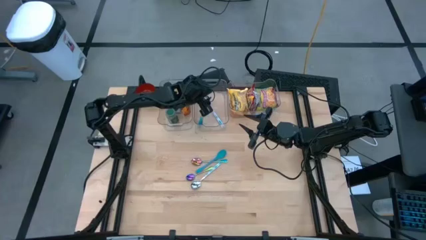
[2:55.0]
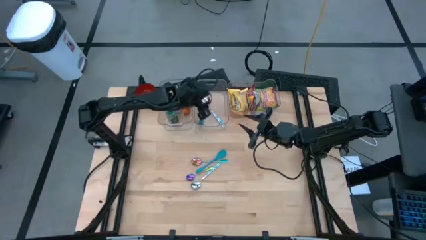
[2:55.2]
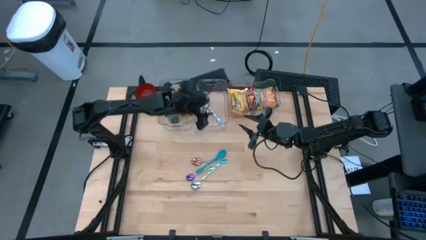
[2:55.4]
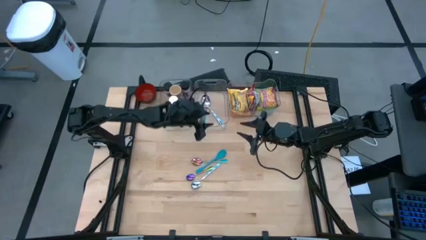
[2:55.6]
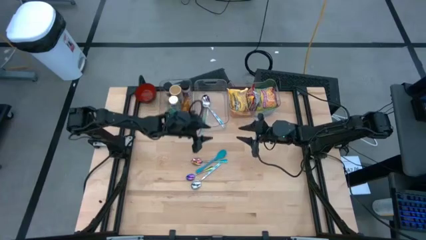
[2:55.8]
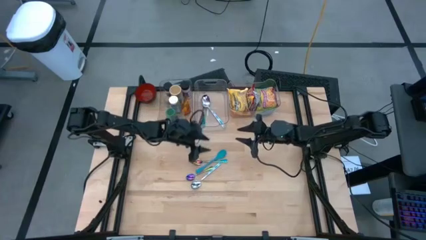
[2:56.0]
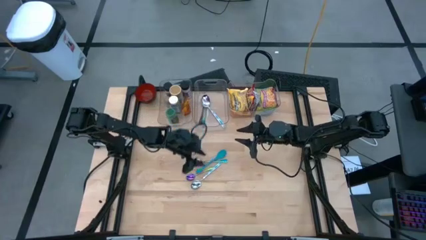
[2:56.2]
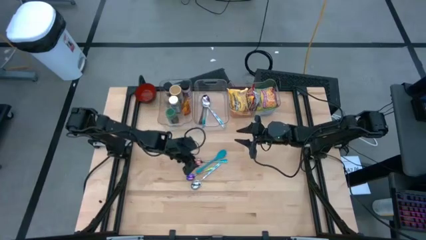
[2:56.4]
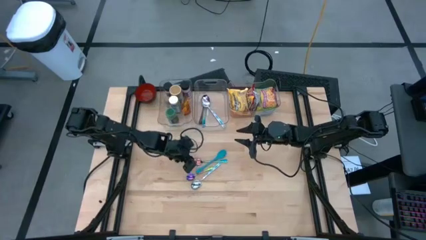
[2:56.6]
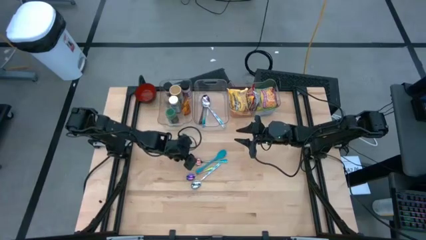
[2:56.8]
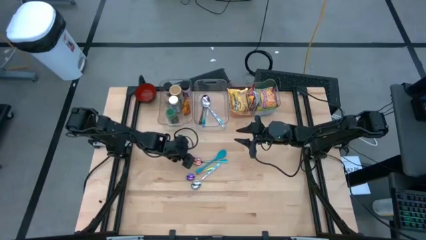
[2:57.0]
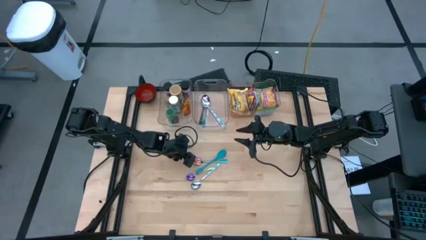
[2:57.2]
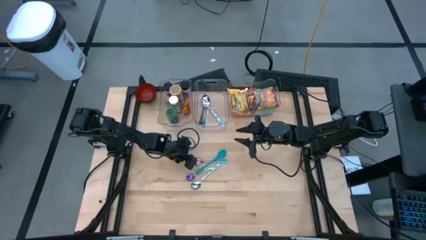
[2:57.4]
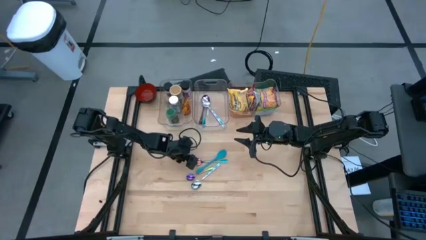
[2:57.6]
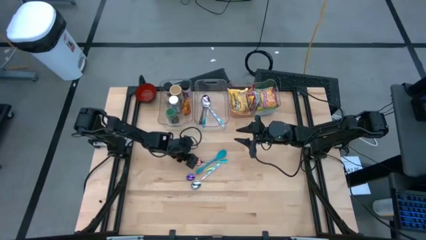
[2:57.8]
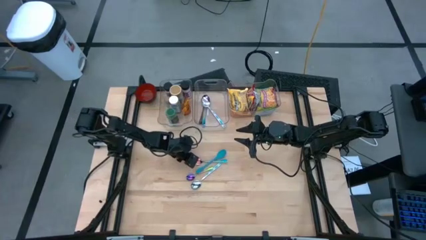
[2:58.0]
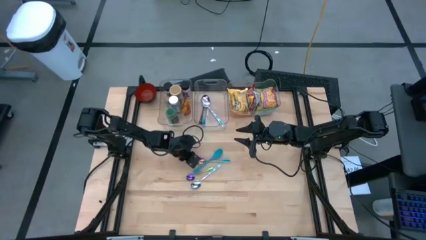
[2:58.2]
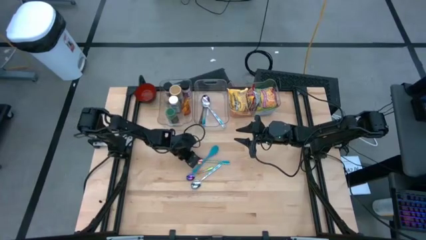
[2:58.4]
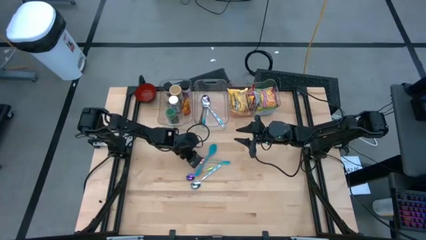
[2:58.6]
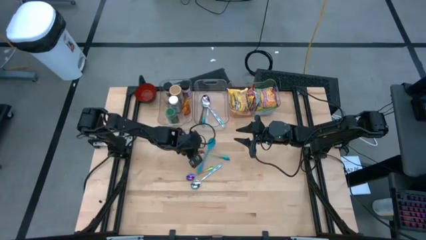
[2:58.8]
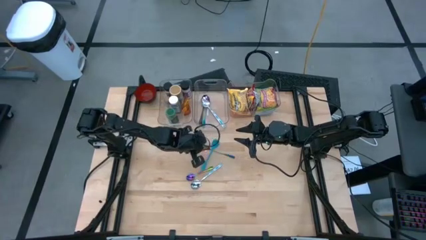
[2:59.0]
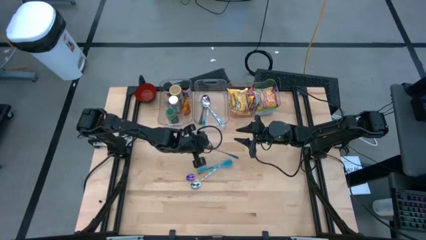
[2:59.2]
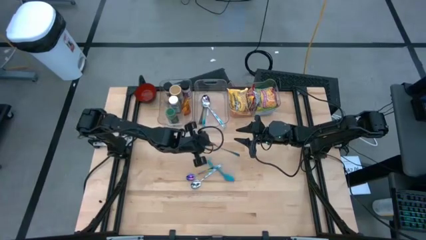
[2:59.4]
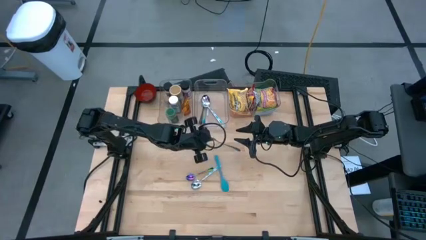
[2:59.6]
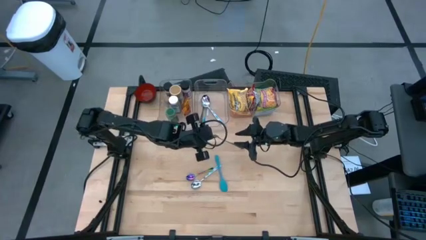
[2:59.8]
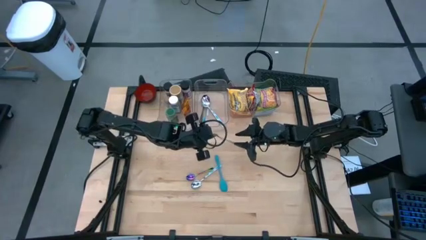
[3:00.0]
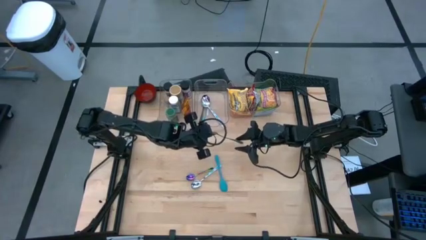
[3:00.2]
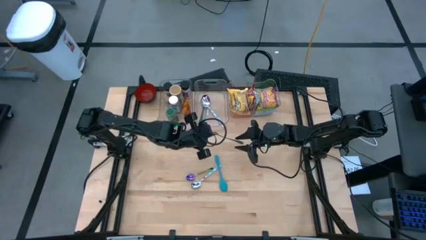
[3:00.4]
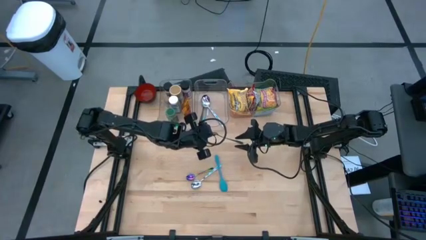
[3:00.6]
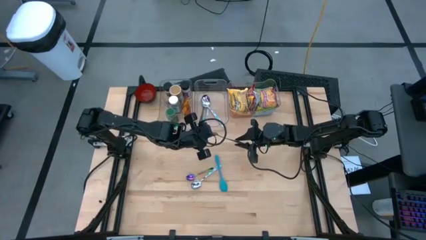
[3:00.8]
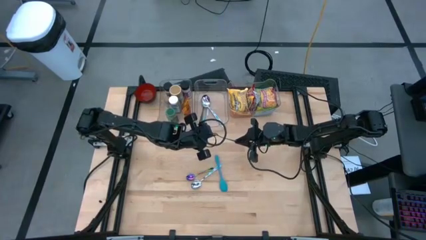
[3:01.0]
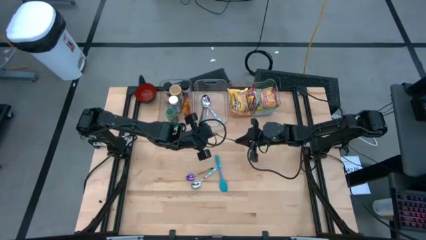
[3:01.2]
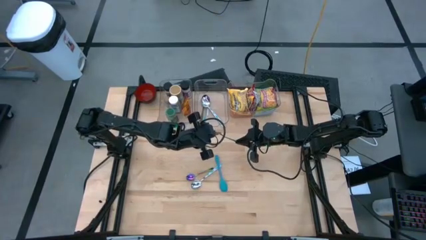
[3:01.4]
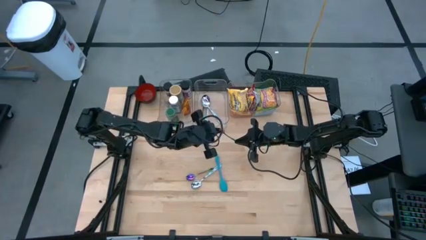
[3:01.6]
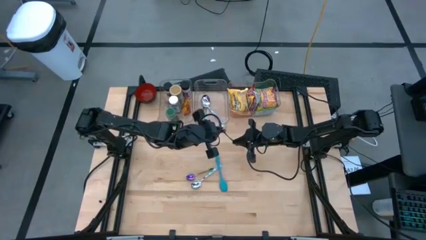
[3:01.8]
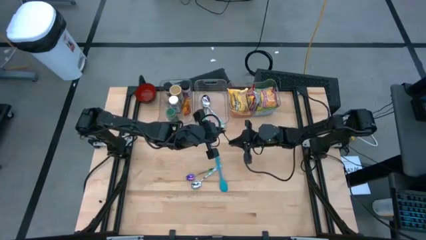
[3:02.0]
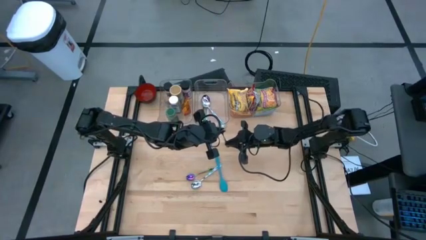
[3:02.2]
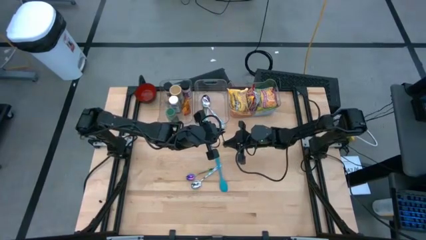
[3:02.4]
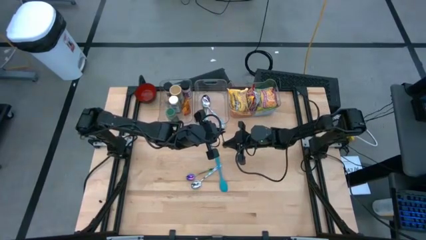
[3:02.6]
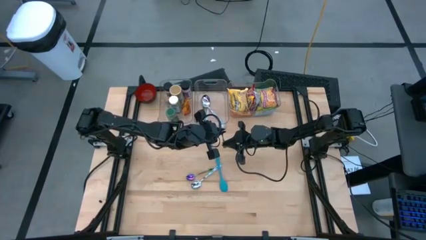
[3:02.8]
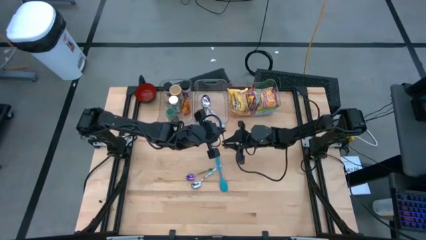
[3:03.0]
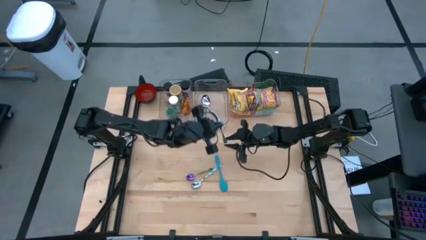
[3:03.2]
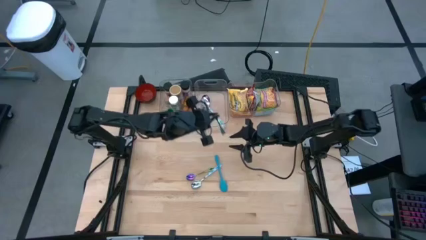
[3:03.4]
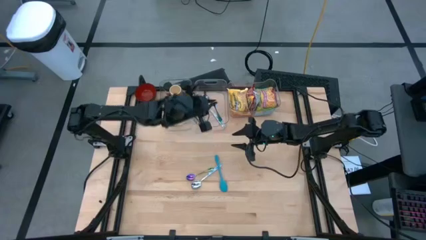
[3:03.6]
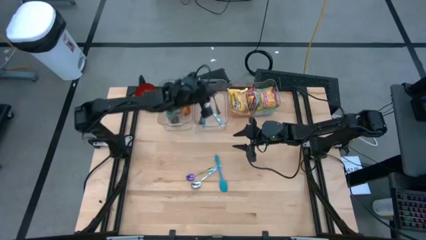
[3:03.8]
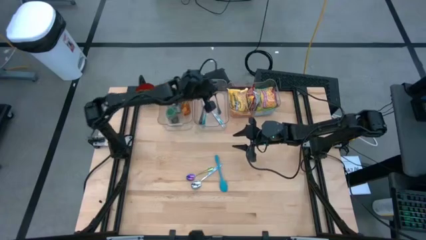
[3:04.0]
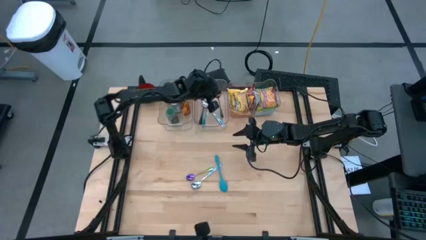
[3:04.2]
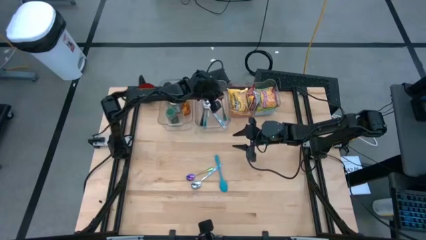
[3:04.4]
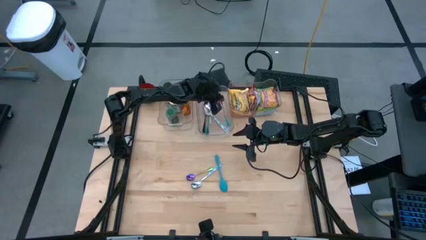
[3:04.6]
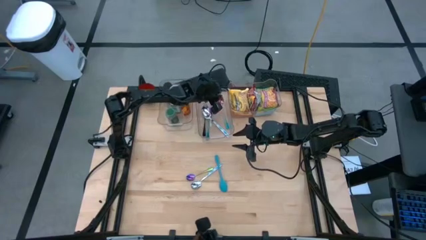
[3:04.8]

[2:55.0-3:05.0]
Task: Pick & Place Food Item
Put the top purple spoon into the middle transparent bin

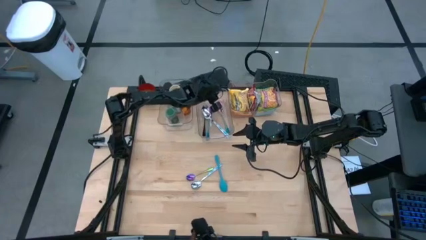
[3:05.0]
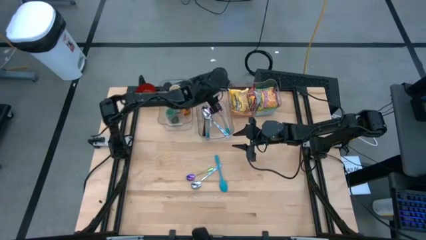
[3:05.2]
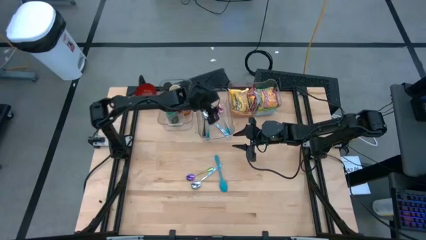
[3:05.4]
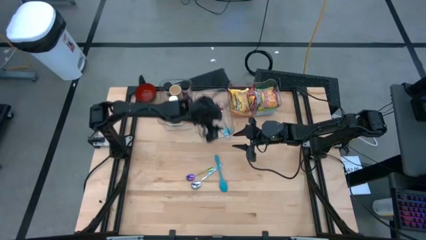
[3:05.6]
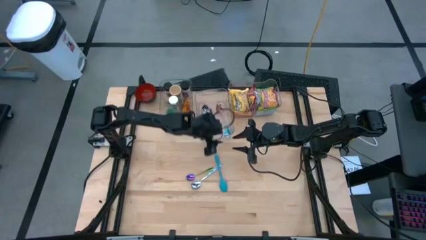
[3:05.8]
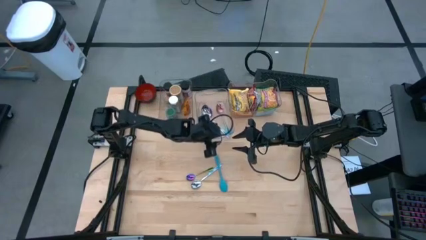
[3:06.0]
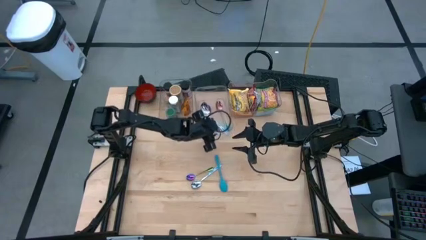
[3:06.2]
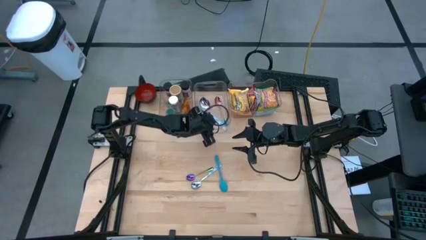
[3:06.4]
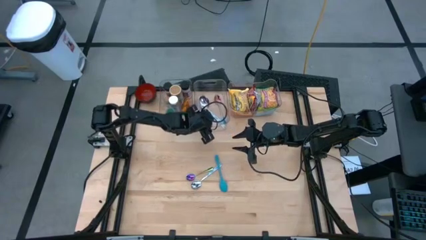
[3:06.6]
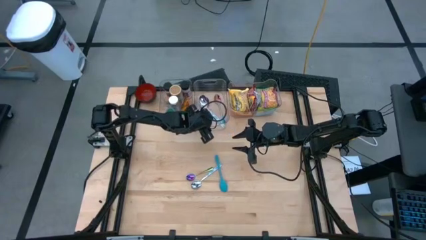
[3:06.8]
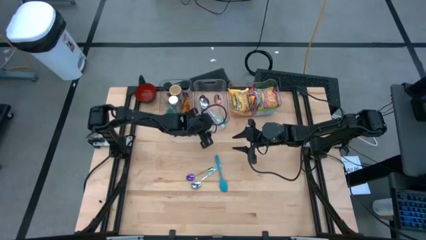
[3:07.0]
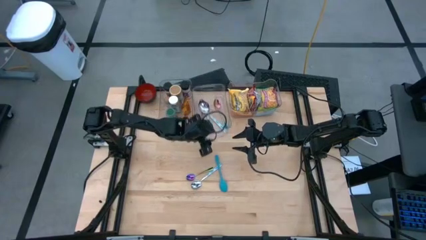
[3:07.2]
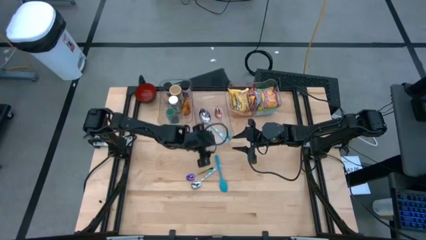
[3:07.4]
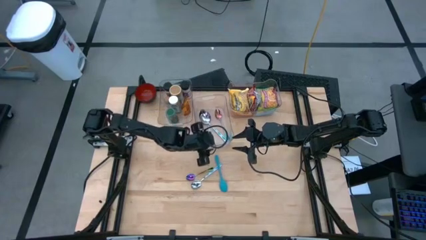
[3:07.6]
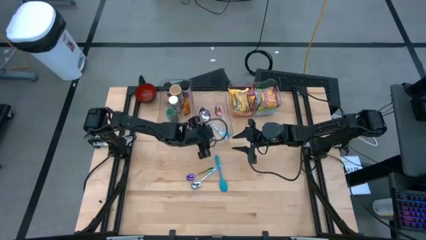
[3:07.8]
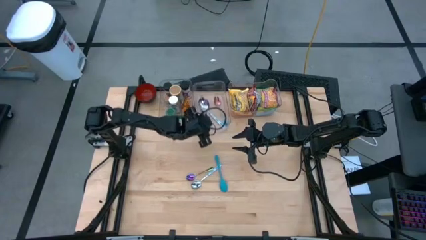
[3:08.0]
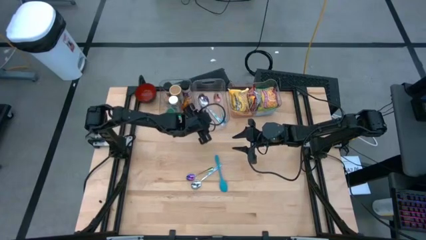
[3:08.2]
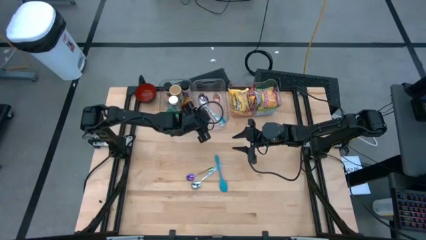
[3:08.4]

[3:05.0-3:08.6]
Adjust the middle transparent bin on the table

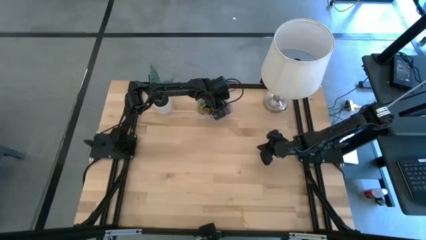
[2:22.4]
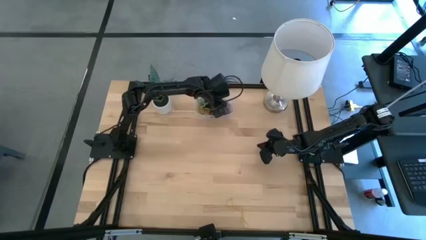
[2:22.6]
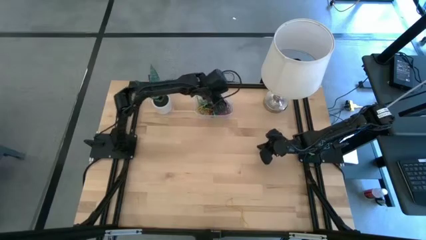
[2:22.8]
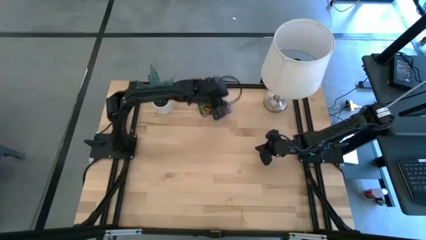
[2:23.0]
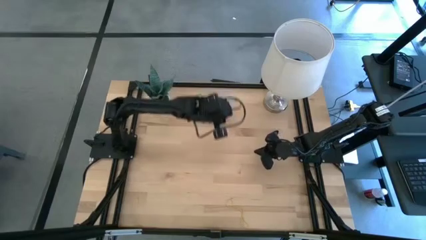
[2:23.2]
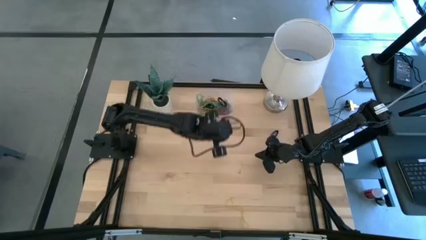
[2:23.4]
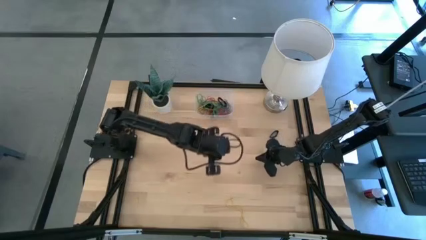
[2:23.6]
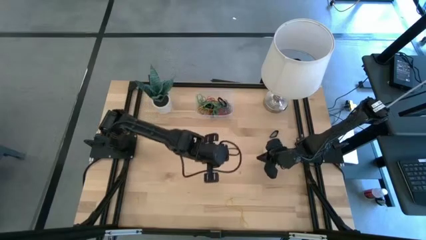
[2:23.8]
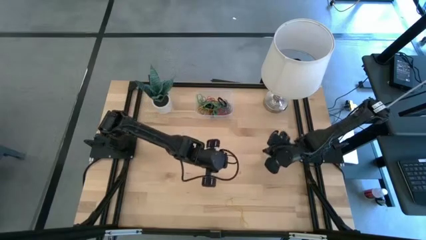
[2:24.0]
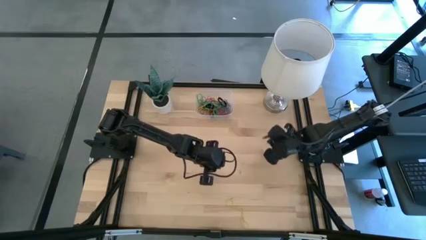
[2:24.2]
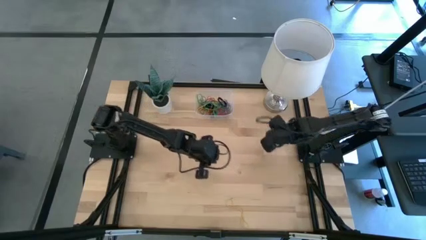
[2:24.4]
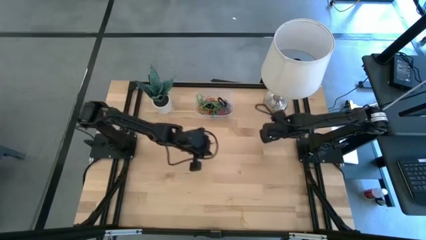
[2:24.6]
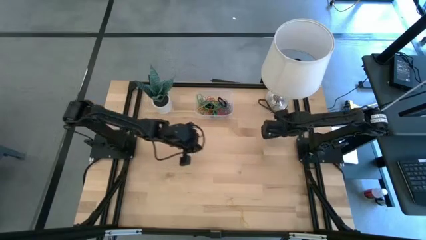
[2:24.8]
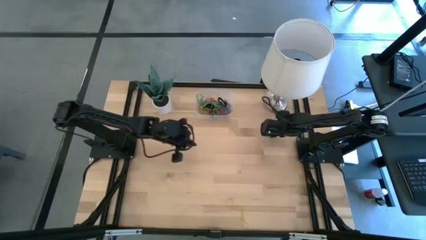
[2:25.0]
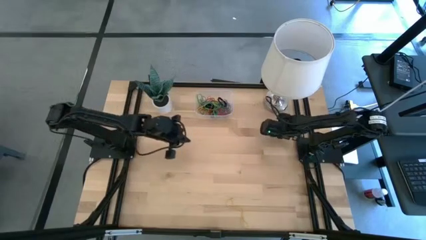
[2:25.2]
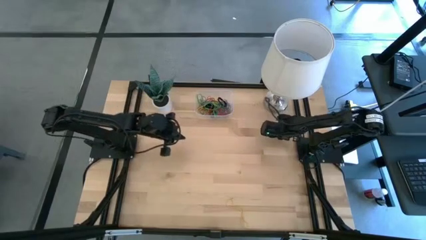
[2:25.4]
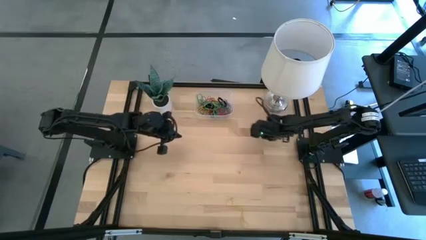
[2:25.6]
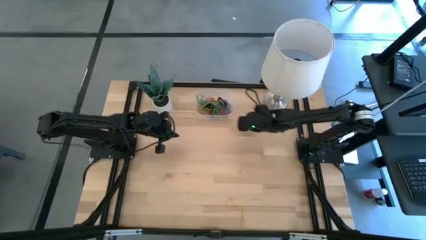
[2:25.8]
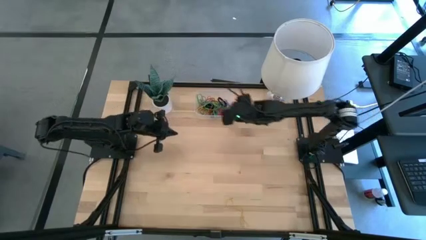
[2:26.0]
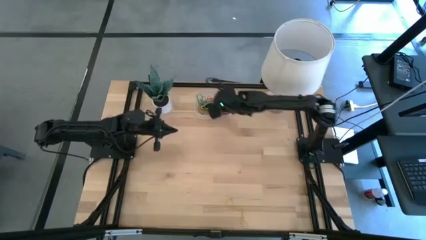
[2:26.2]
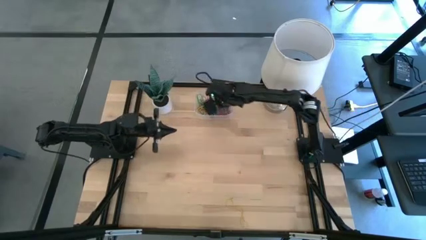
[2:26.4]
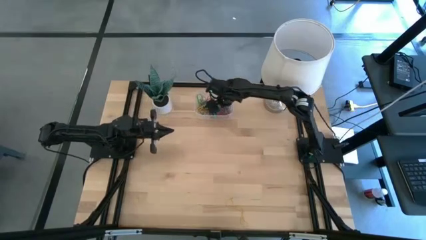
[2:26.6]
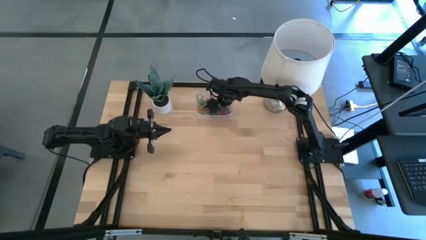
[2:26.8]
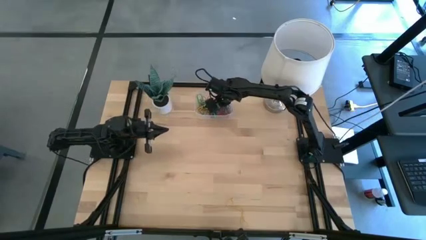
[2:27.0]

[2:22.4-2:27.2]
Task: Pick and place rubber bands into bin
Put the black rubber band into the transparent bin
